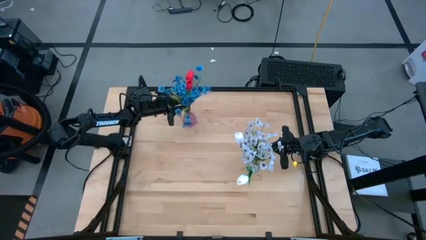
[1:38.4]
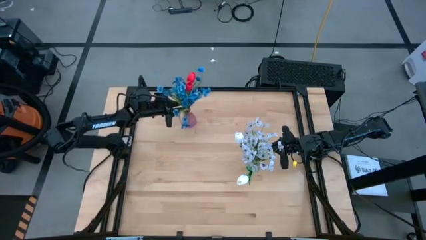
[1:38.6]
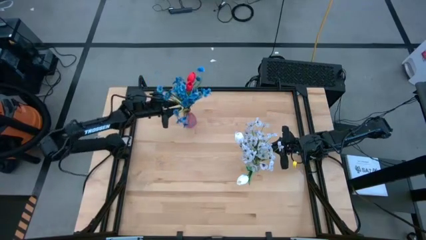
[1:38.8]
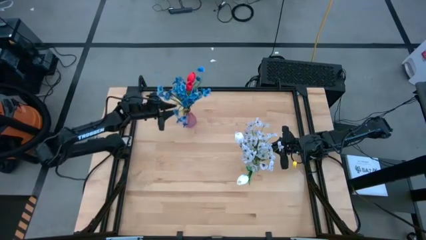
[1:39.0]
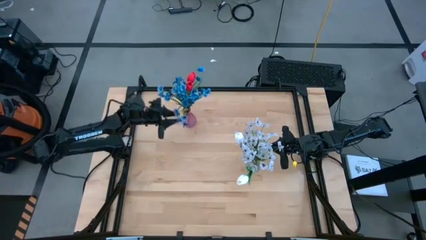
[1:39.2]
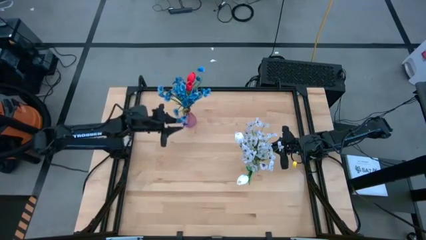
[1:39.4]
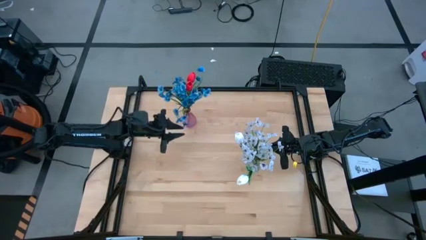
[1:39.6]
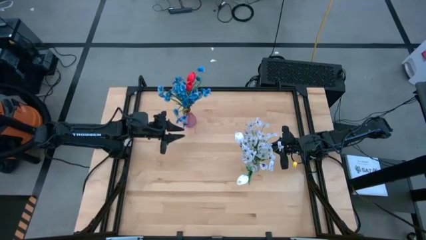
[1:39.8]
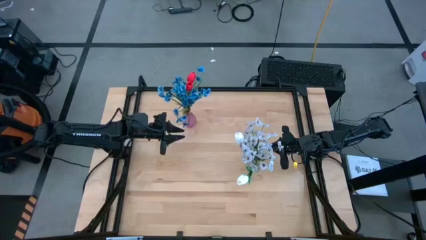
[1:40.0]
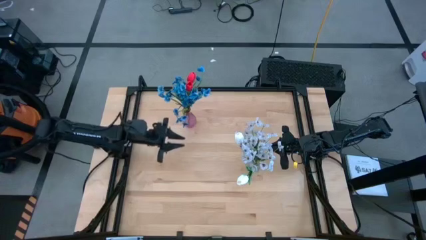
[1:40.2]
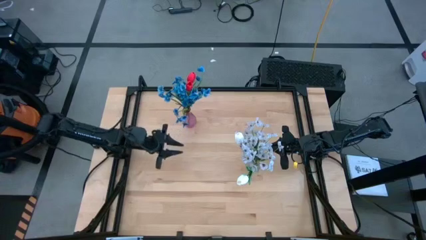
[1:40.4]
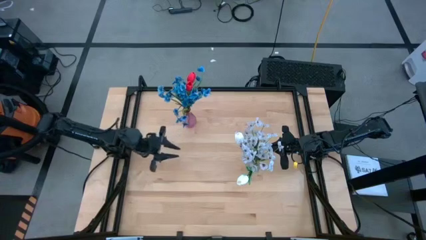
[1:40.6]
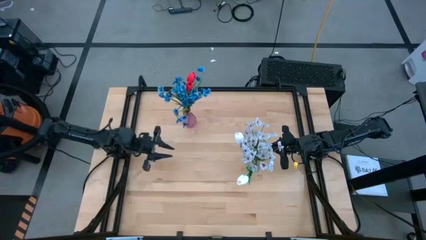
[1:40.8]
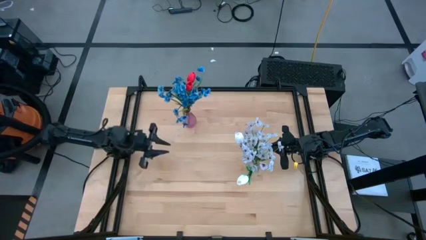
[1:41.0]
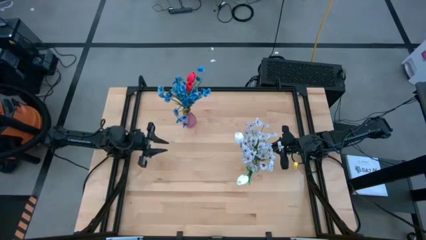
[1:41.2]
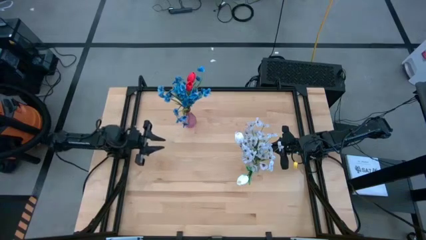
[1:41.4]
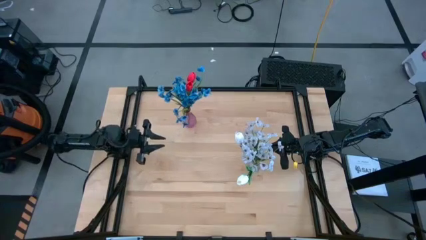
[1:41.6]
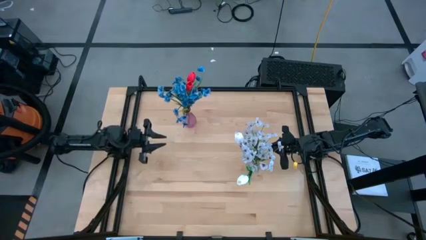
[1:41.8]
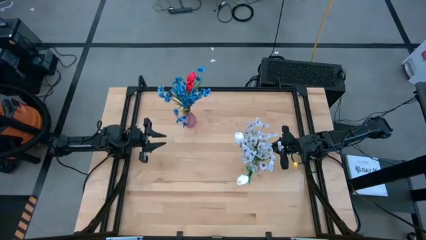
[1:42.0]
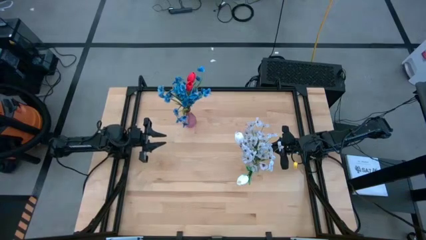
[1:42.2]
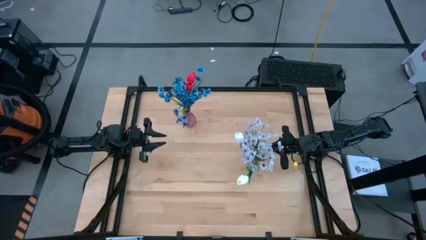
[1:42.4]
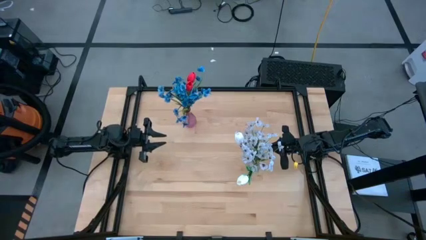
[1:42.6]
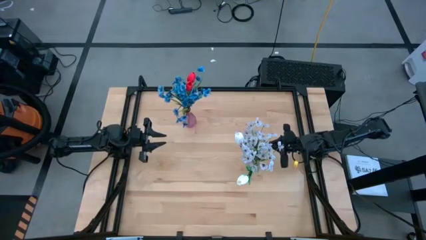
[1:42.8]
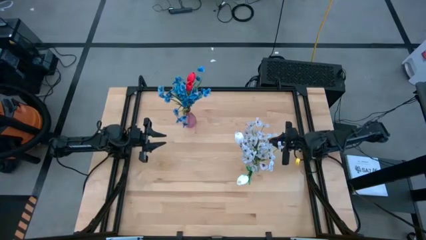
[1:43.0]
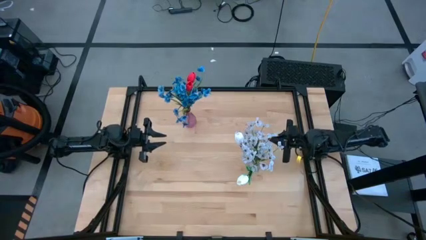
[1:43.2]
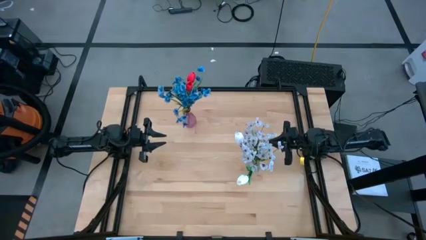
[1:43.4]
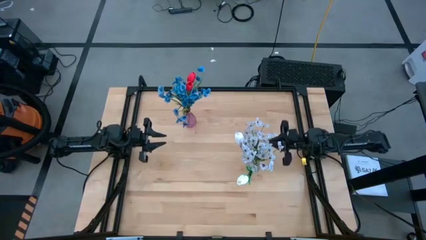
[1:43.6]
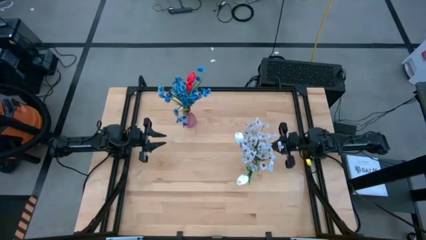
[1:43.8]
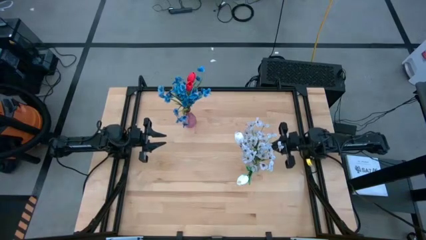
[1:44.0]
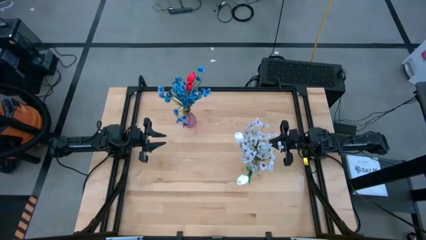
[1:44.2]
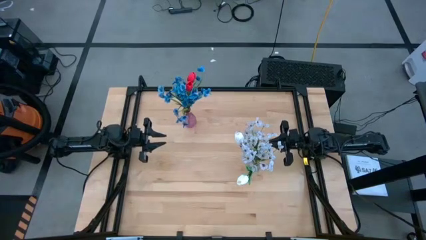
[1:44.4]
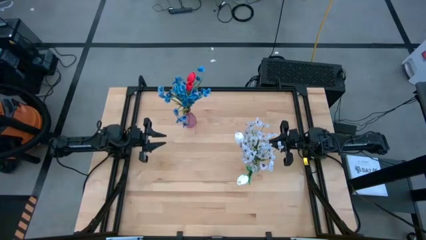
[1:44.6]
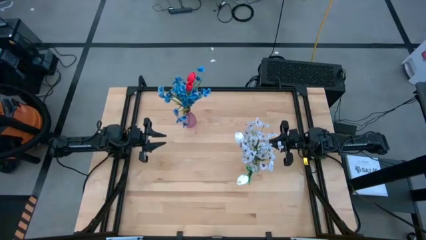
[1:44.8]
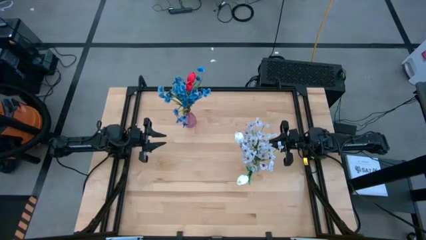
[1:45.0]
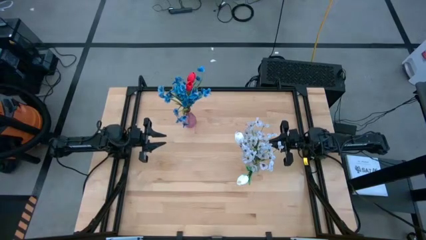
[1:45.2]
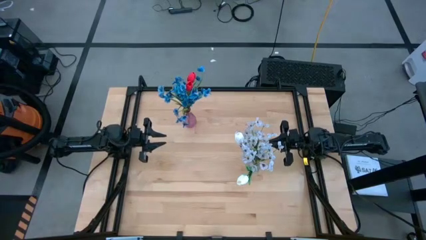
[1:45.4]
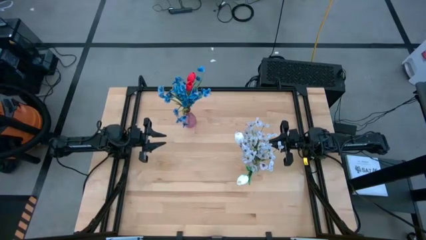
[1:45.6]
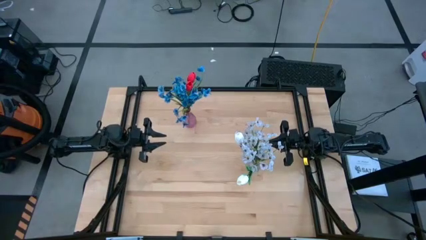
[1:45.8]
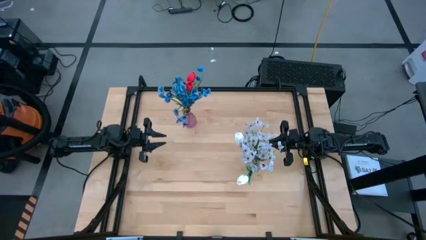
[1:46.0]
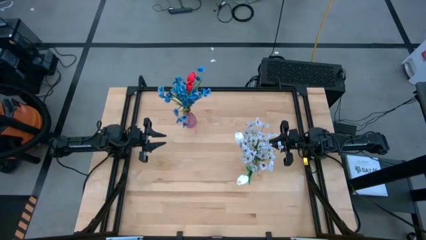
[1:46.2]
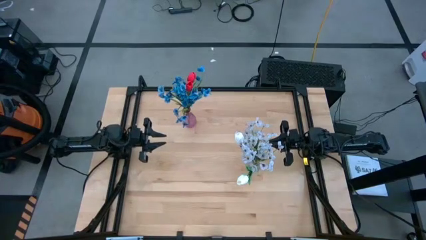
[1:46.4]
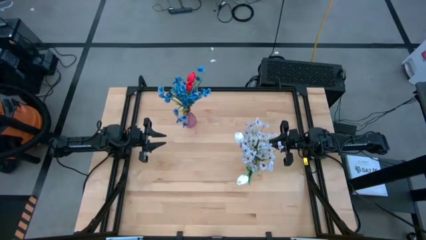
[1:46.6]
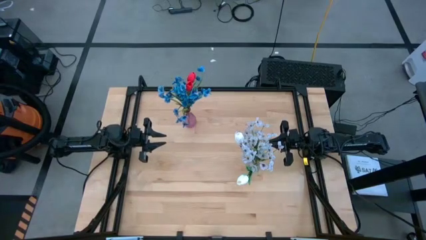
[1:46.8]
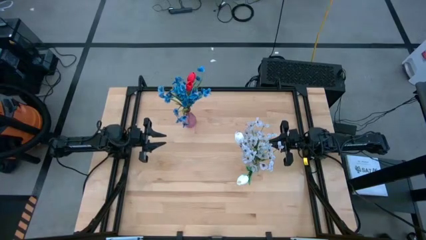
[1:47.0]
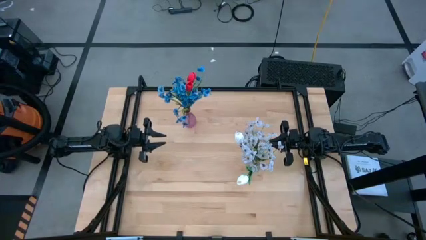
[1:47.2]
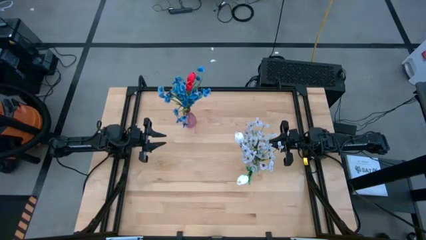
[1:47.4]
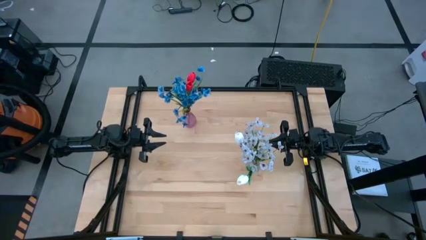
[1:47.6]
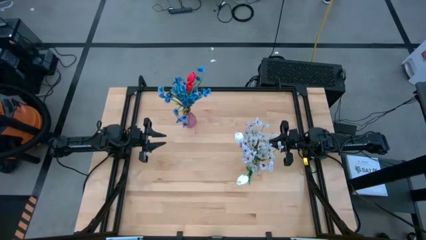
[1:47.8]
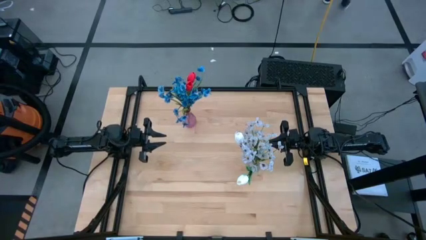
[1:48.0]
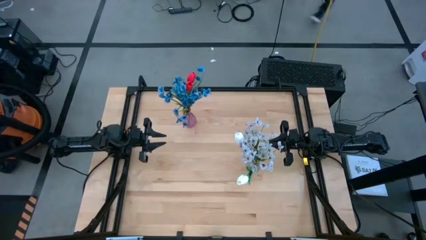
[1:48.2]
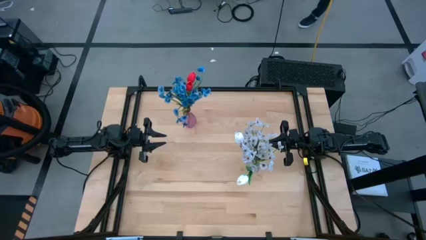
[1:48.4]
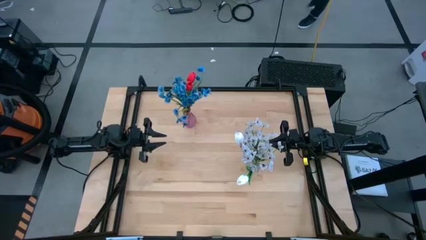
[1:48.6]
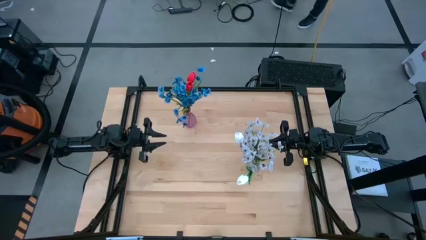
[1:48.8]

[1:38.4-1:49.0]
Task: Sort flowers into vase by color
Return to Home Position

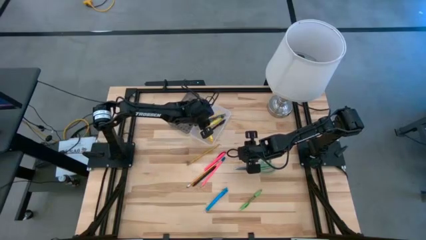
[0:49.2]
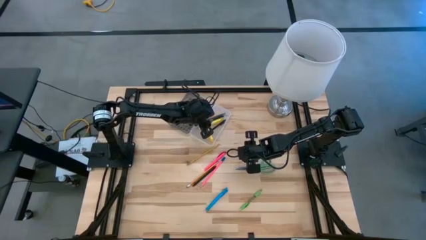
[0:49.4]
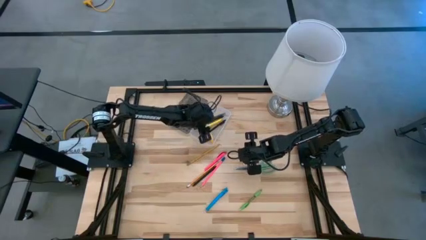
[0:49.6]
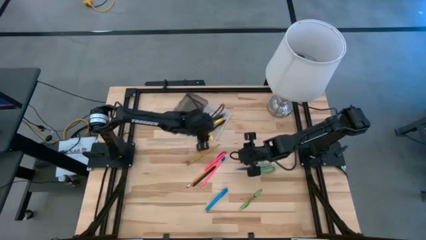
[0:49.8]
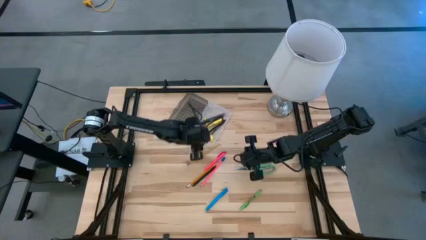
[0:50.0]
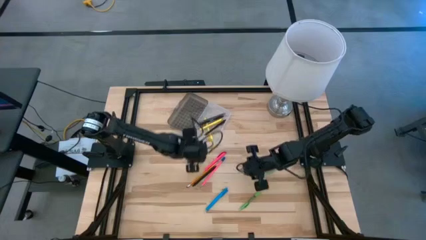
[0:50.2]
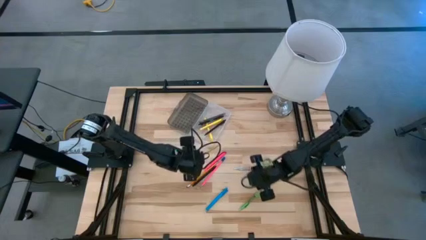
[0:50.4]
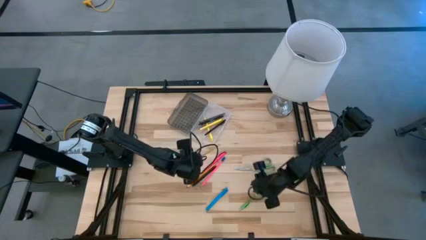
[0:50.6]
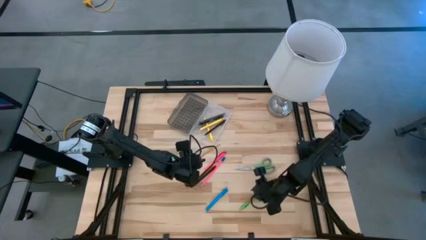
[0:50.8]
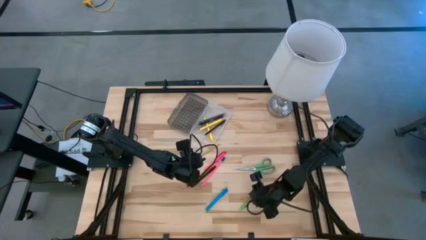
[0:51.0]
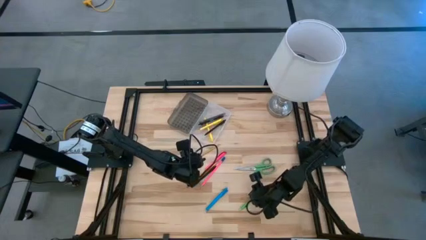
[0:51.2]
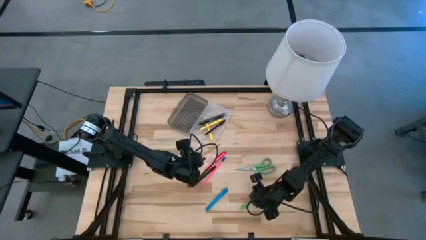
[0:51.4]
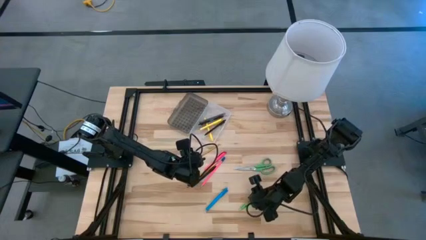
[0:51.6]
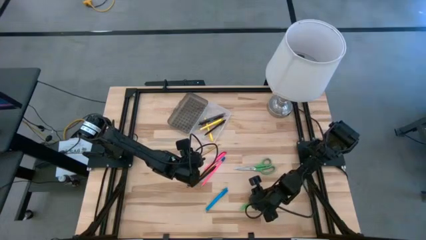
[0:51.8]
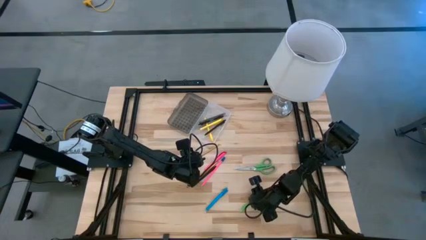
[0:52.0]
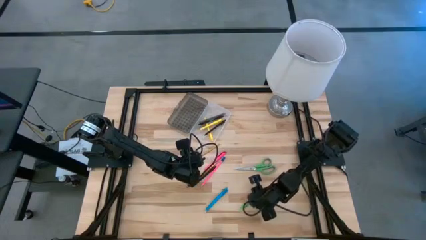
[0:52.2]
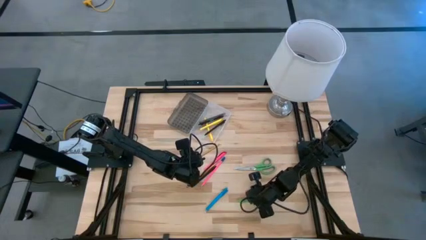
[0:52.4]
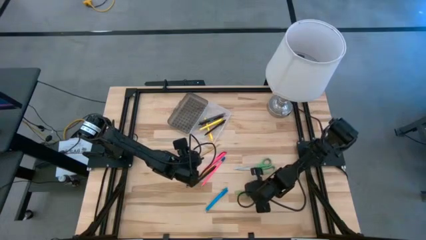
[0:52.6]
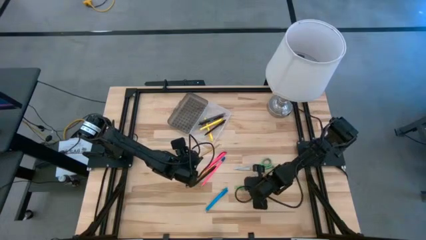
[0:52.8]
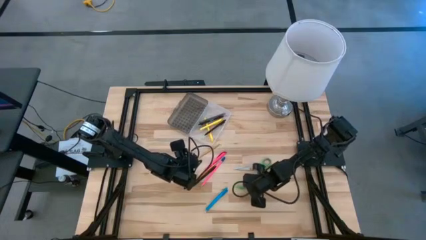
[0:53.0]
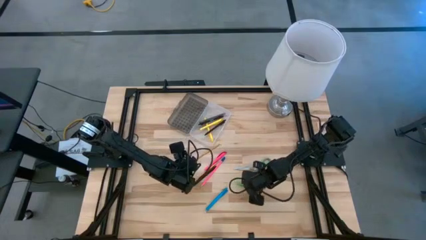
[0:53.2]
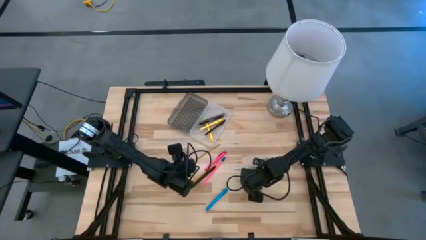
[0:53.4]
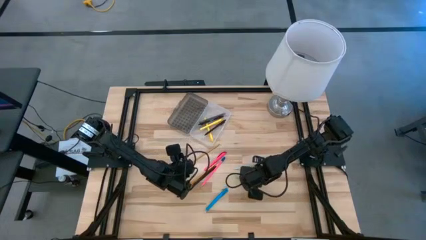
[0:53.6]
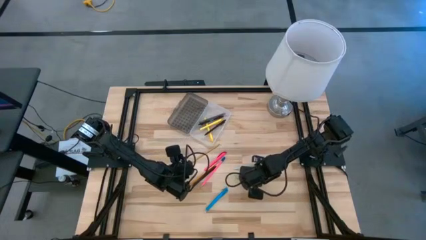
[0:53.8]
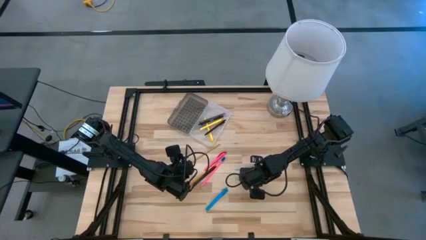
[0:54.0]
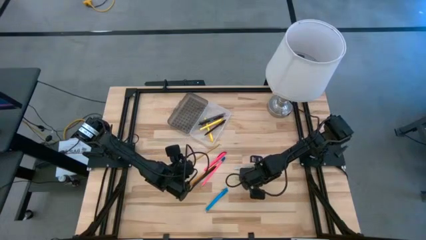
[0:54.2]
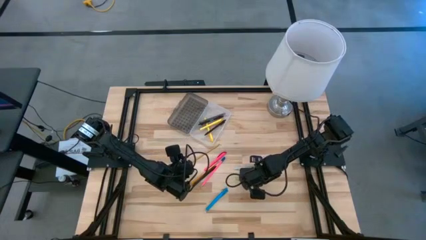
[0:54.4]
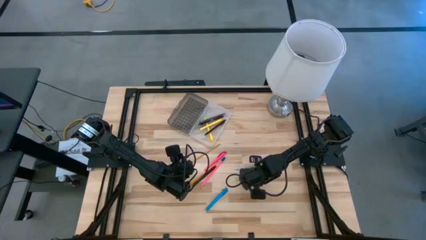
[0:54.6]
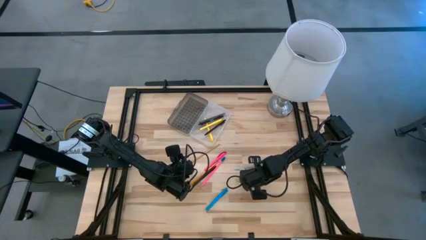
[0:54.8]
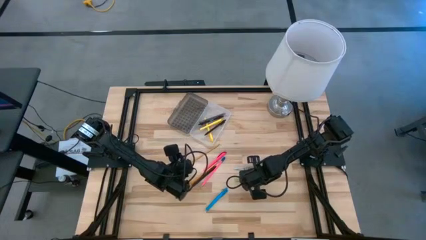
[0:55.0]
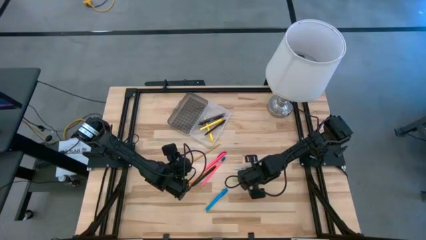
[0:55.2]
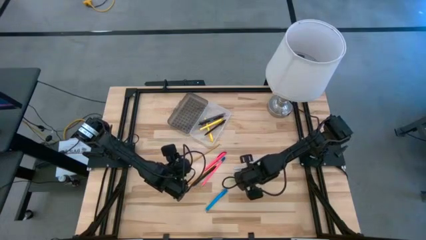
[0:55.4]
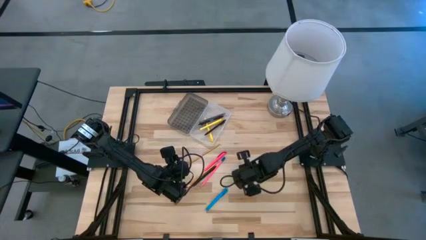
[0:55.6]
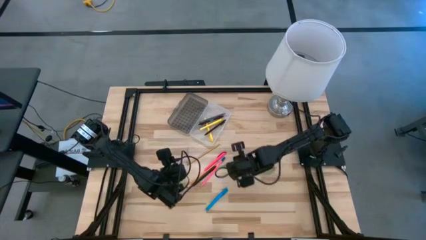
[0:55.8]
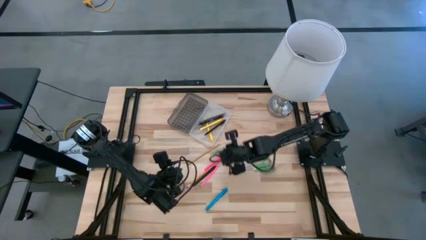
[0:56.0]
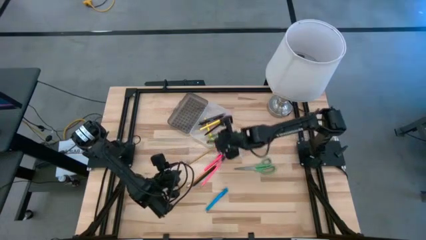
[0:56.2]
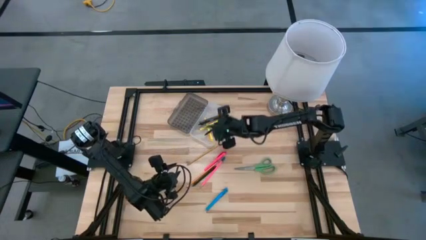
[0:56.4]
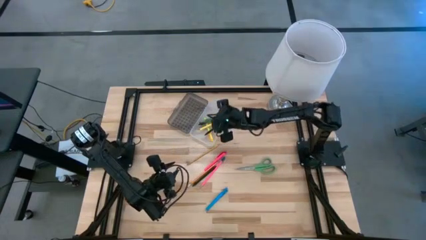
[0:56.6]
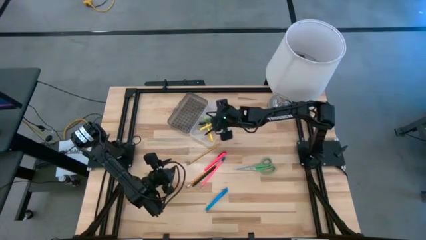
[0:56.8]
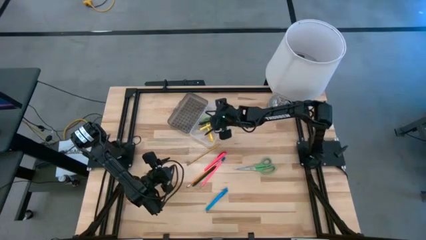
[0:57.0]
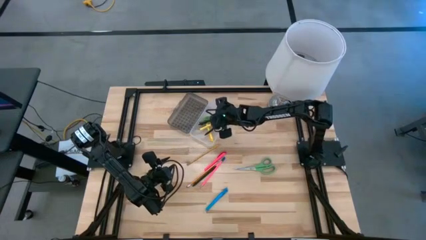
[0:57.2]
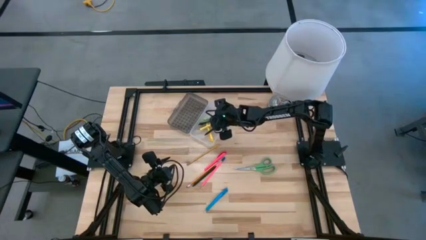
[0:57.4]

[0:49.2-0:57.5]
Task: Pick & place school supplies into a supply box
Put the green pen into the supply box
